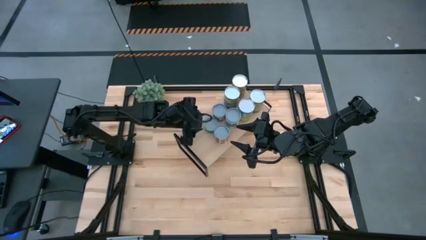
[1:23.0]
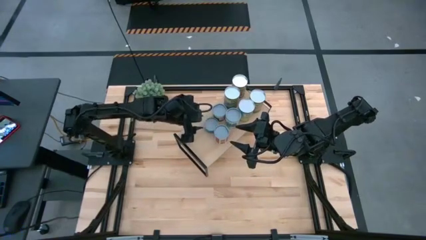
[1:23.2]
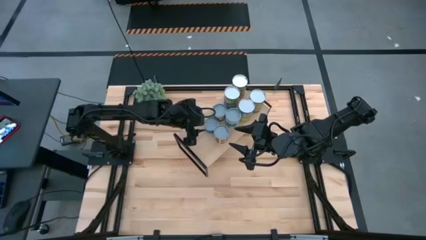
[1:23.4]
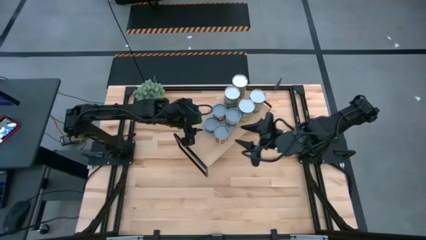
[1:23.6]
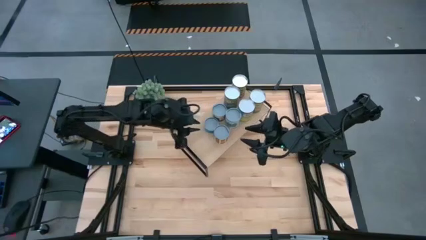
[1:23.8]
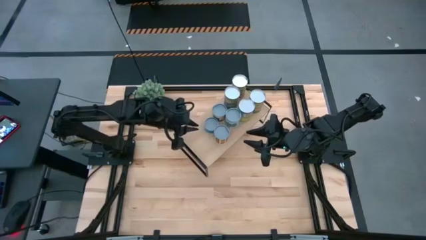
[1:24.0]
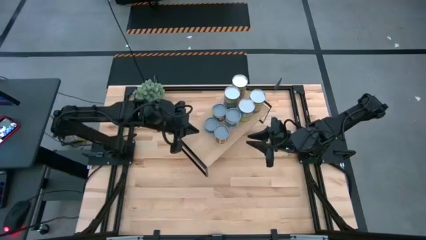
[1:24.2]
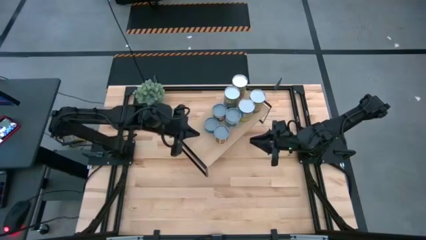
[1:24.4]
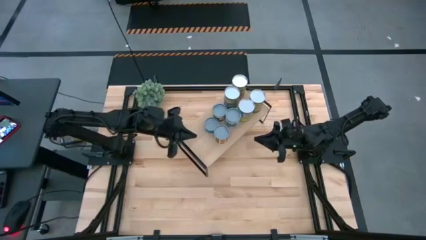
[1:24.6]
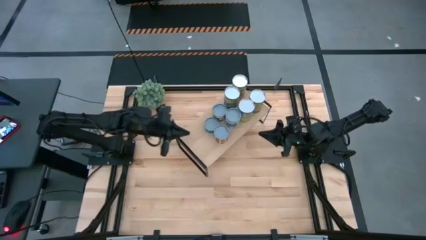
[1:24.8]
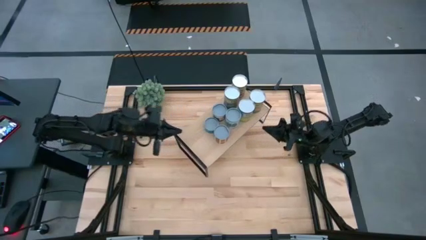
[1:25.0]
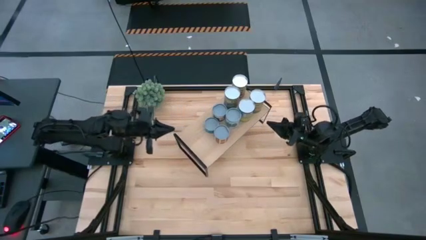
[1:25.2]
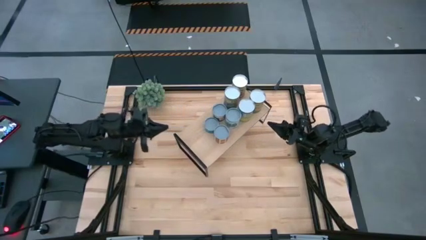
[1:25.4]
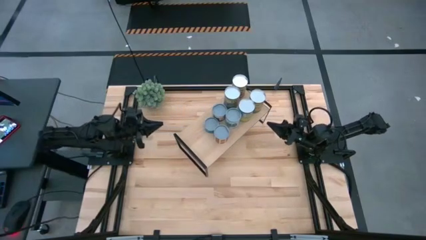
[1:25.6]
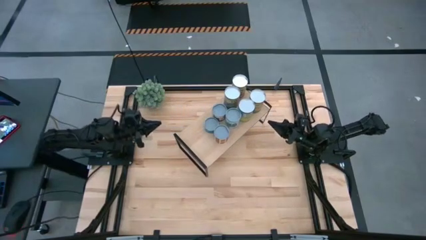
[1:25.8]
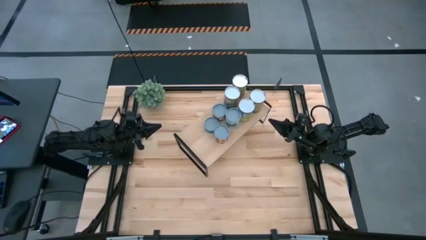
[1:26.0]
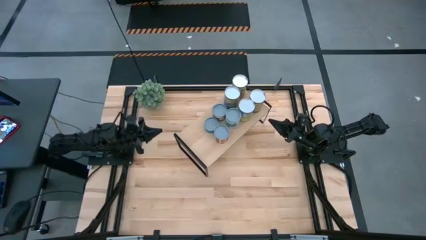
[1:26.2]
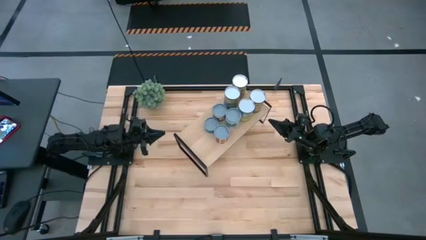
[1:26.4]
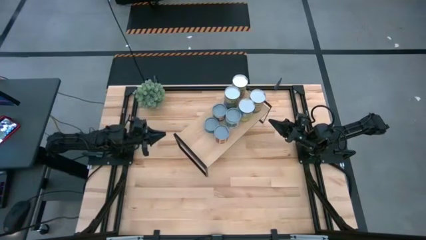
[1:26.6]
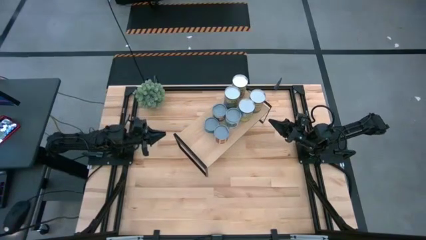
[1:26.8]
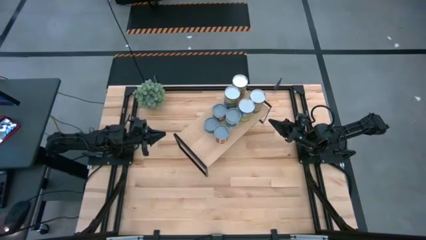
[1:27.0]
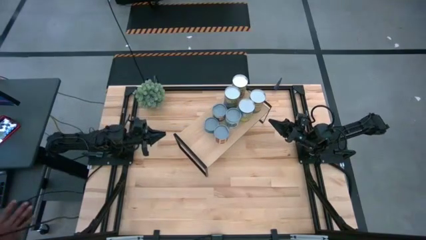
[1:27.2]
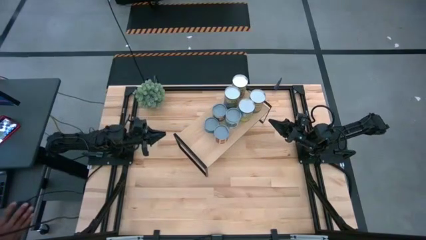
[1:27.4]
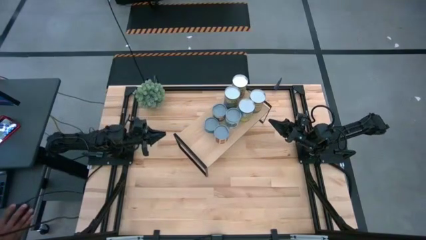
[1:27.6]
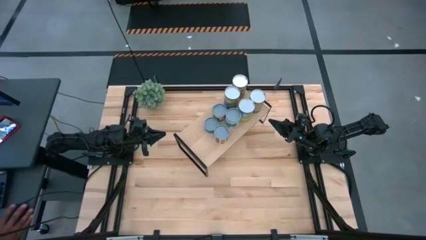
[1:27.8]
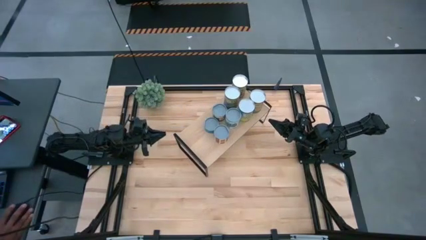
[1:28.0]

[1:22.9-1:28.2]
Task: Pick and place cans onto a shelf
Return to Home Position

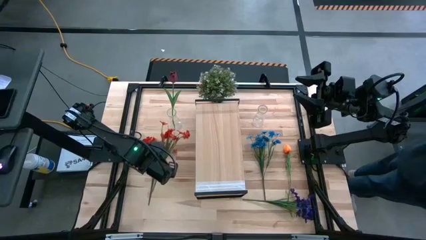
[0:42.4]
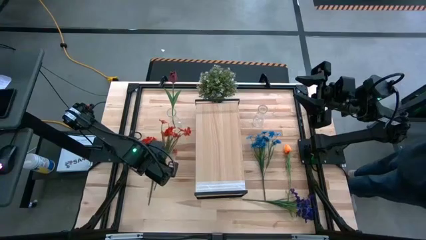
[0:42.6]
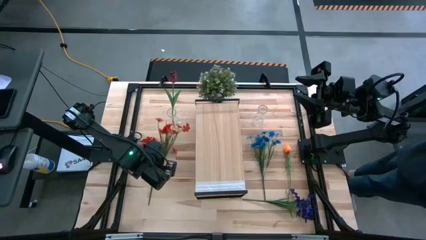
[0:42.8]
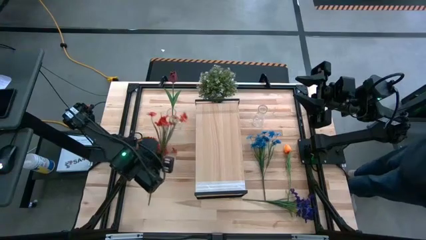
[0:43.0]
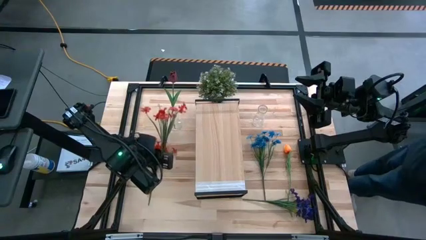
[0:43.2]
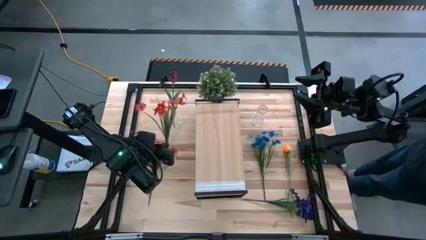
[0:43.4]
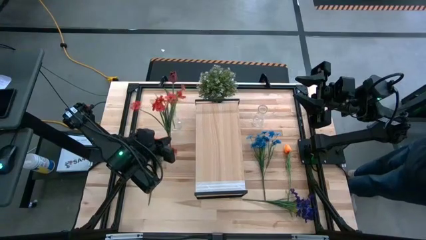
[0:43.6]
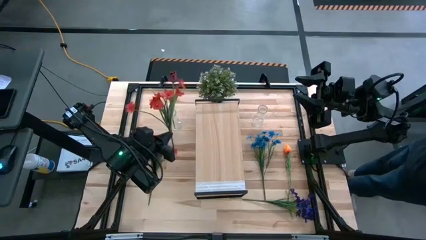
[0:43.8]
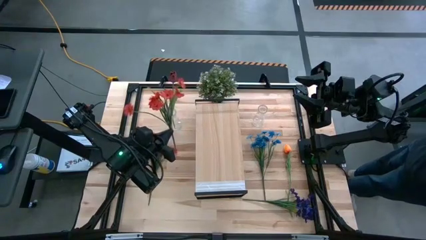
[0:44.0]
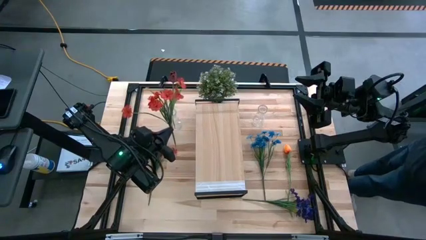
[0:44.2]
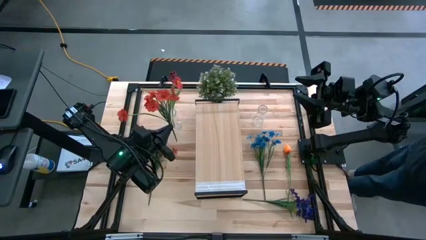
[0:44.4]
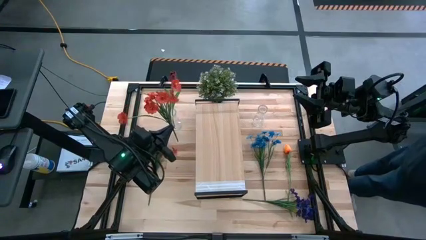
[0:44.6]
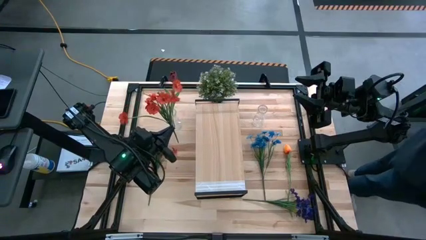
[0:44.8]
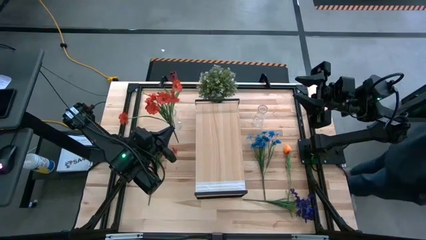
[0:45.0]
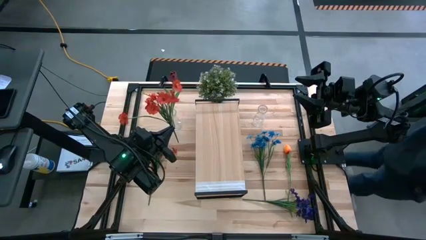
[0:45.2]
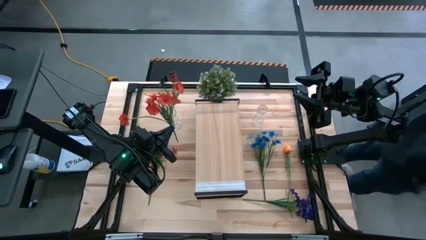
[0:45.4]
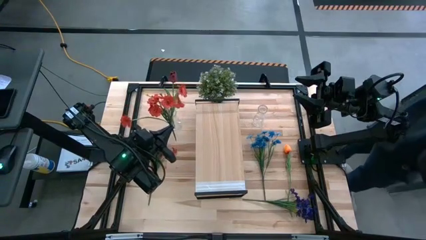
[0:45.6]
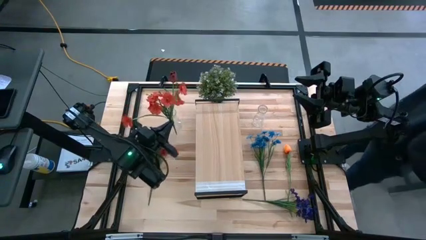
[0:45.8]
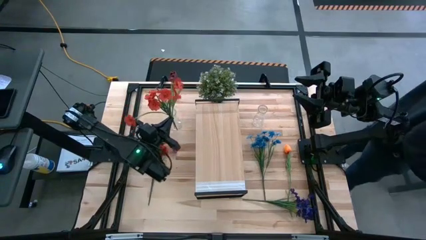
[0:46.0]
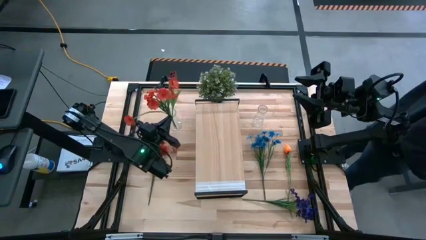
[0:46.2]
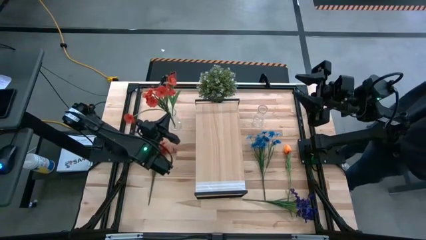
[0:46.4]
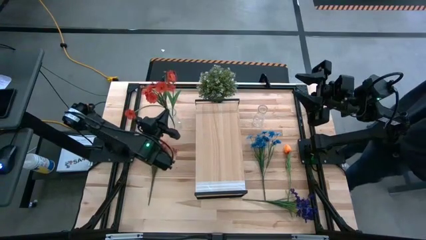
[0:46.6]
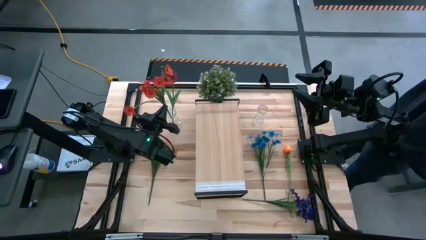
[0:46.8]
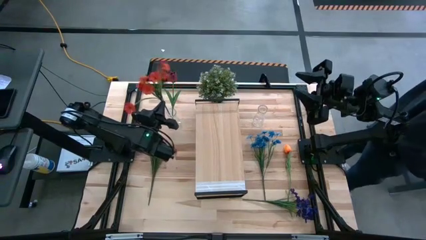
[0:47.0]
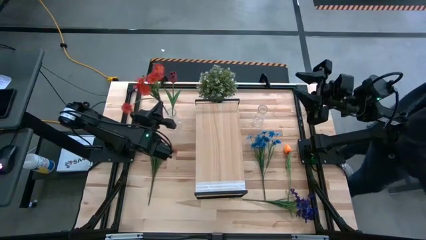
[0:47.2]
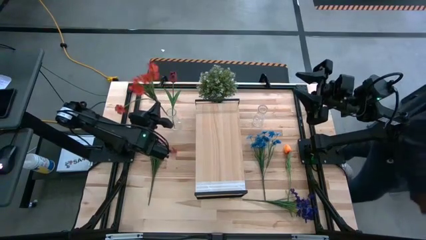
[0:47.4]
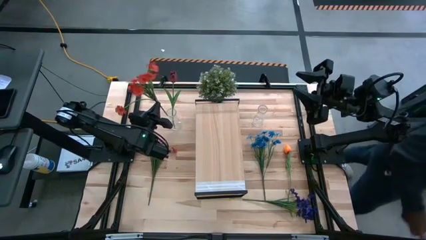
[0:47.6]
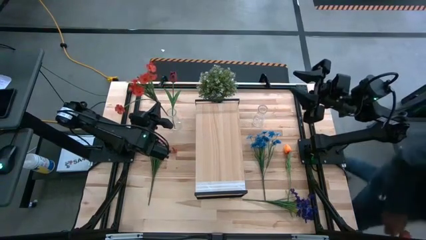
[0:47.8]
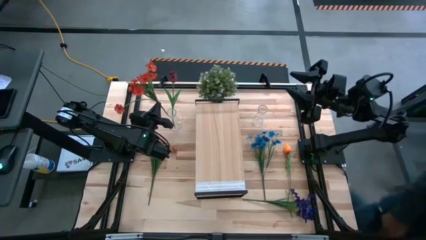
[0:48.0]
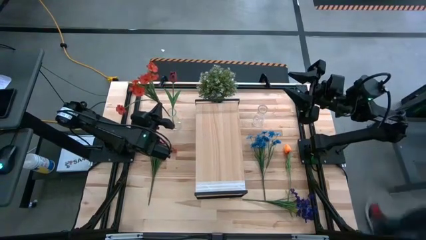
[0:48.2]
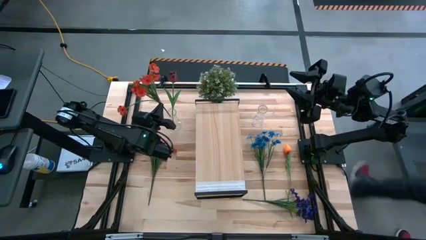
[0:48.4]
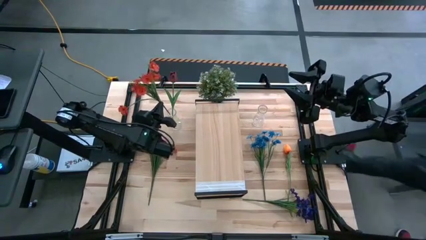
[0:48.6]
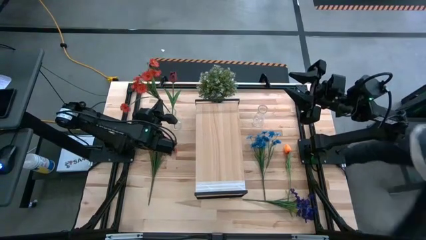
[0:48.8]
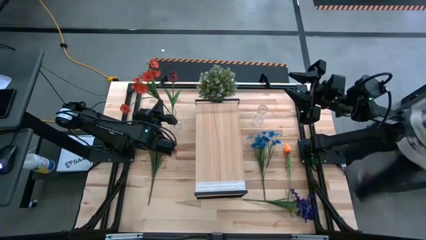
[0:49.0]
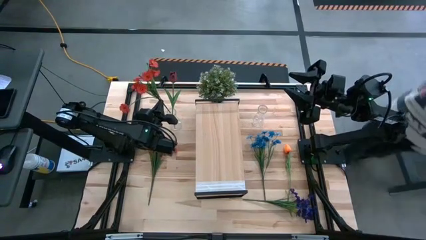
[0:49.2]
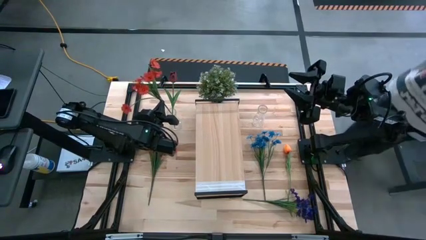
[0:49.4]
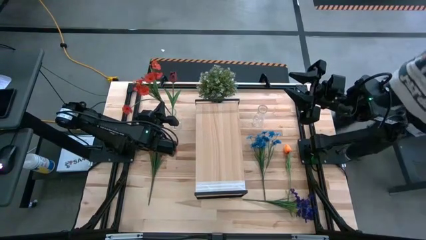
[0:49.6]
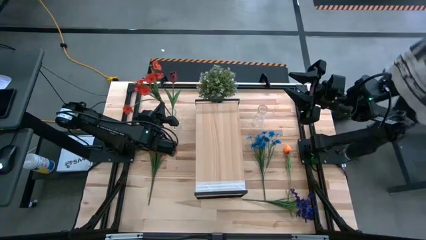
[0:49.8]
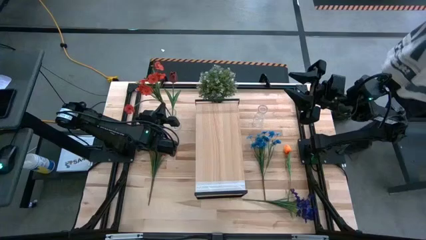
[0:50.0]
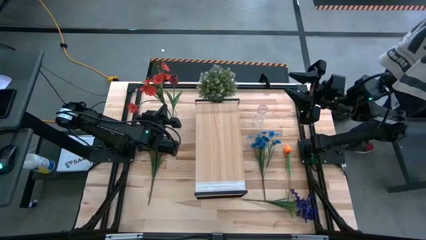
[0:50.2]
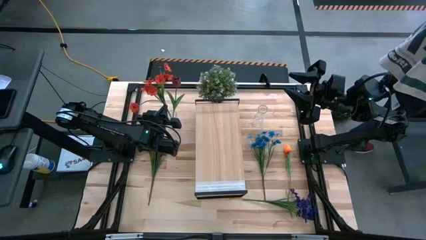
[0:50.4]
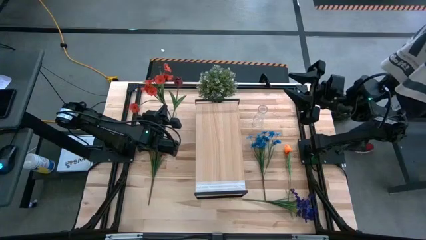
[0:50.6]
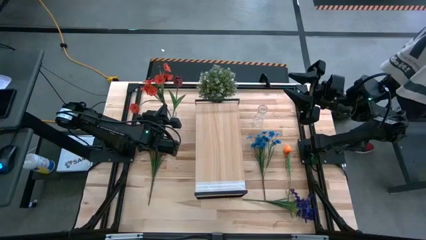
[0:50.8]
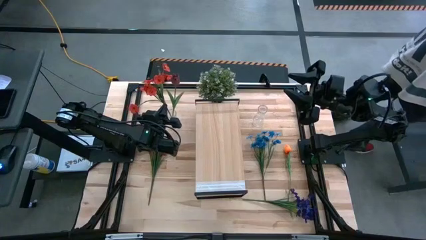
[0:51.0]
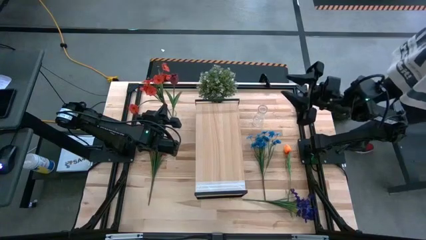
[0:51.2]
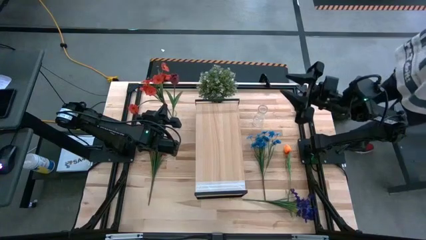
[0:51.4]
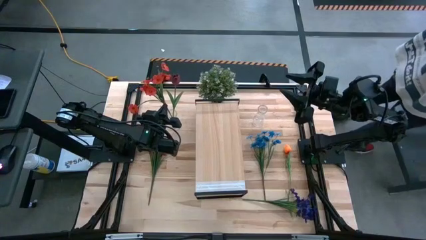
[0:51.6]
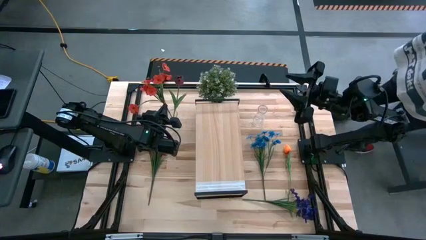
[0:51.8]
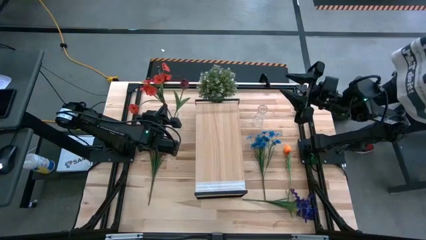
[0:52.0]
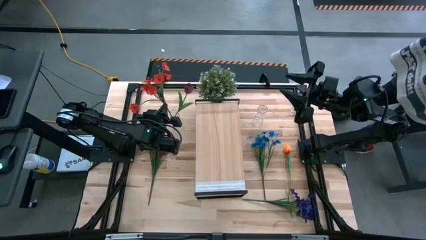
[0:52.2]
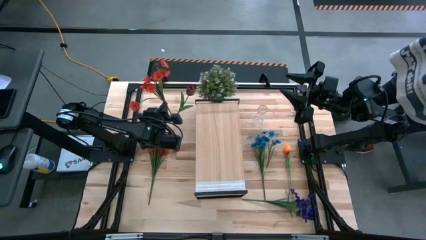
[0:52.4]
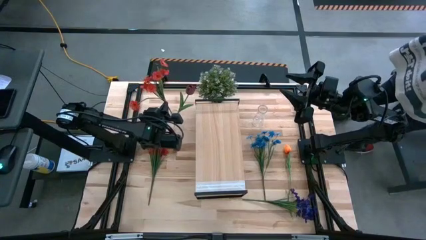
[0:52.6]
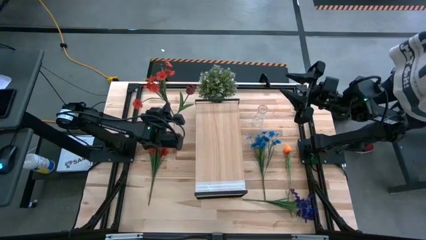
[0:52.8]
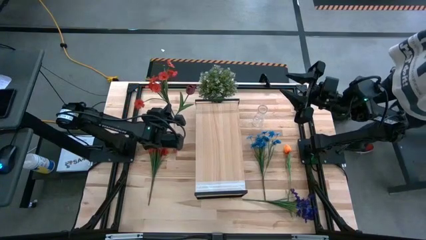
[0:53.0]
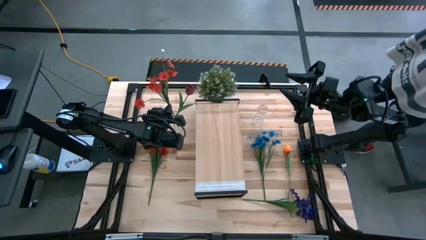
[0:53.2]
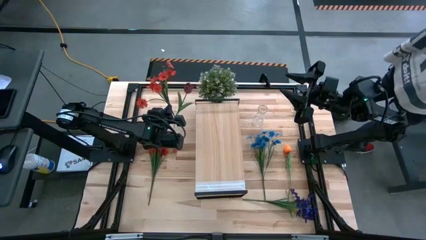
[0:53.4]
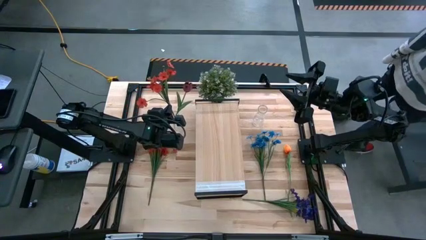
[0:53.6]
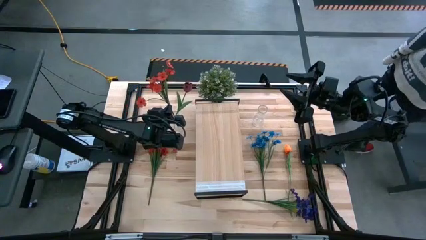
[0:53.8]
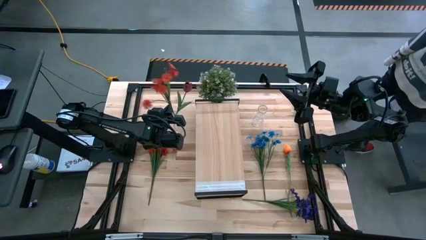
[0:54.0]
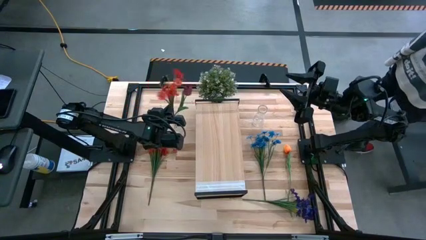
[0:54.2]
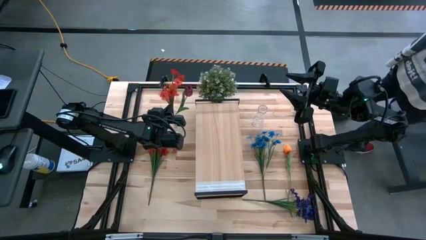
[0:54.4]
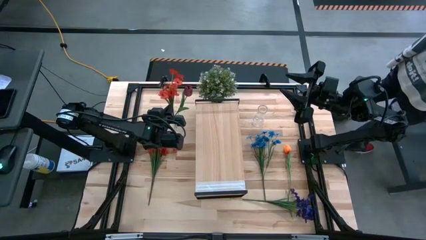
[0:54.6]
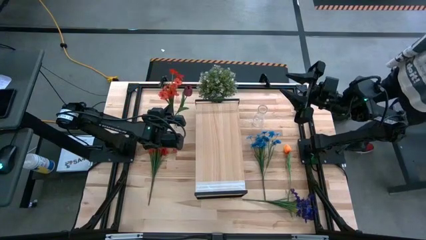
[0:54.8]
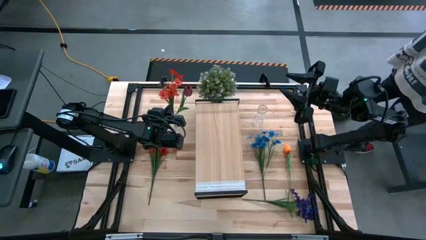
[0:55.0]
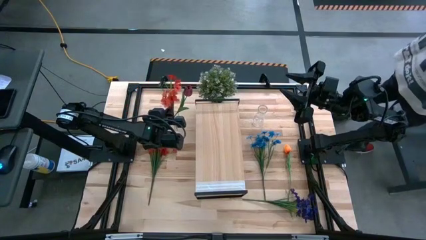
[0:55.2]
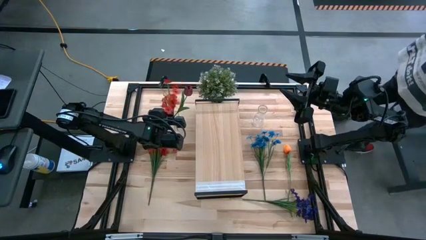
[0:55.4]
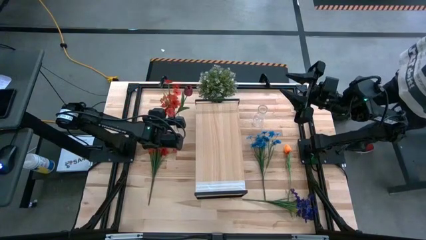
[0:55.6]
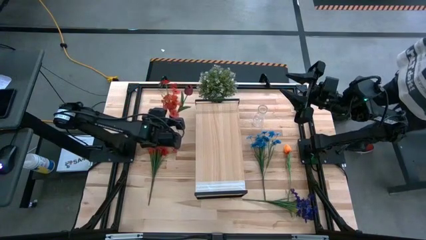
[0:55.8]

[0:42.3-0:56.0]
Task: Pick and place flowers into a vace then onto a shelf
Put the right orange flowers into the left transparent vase
